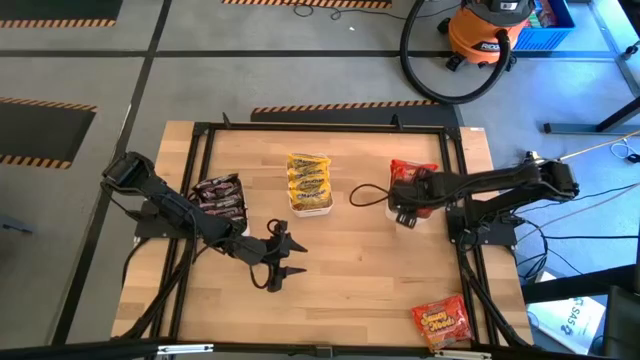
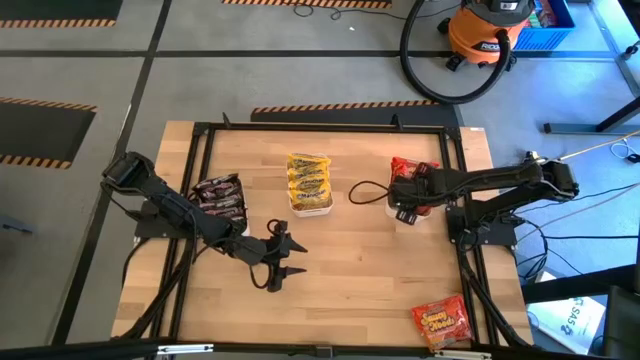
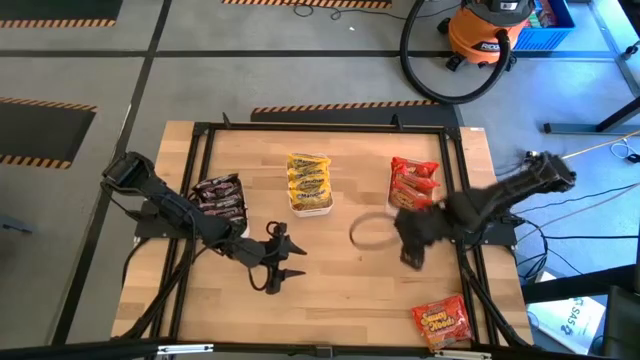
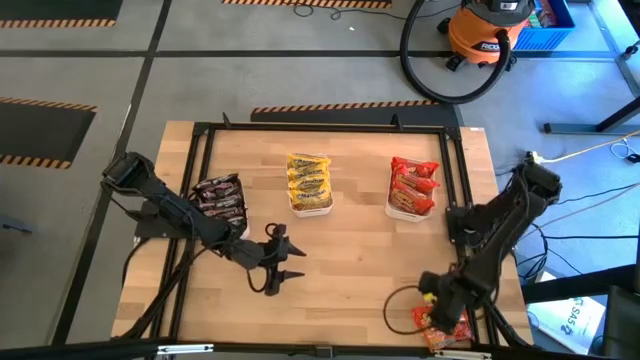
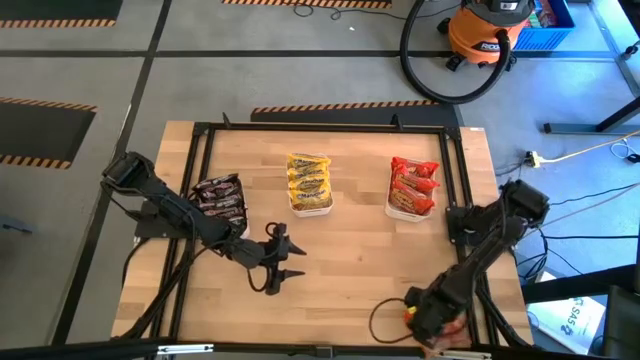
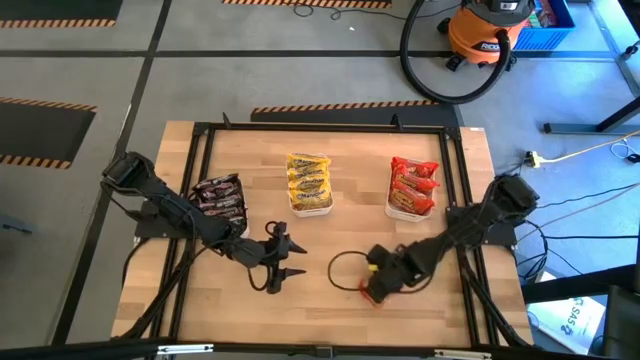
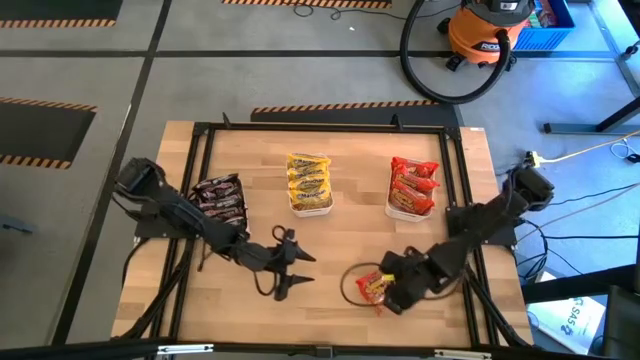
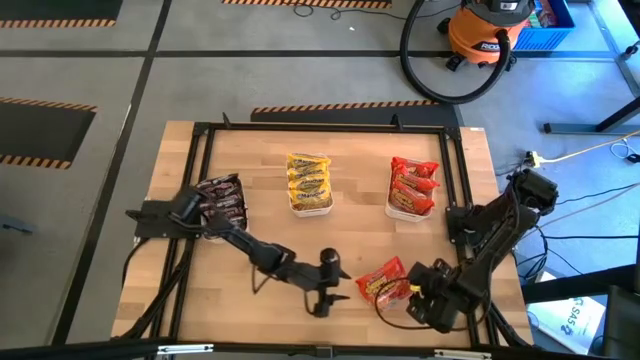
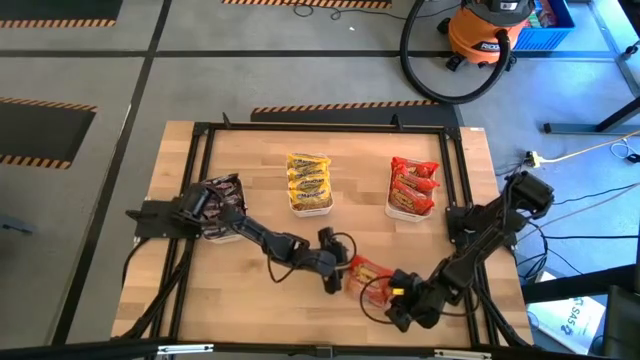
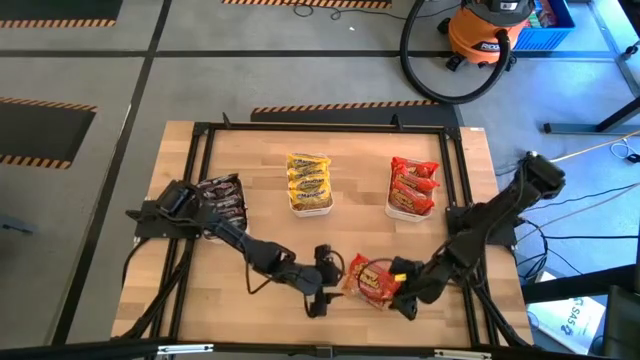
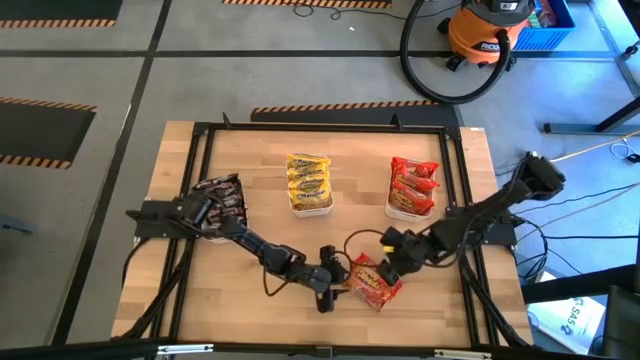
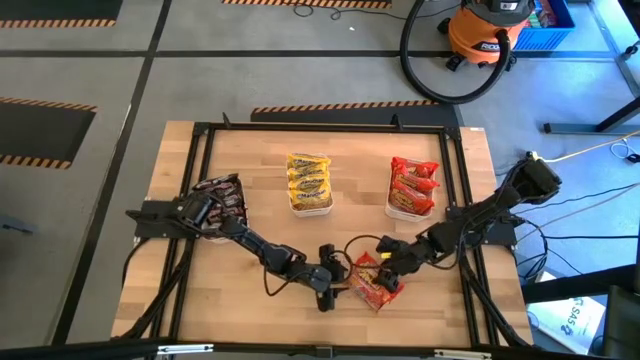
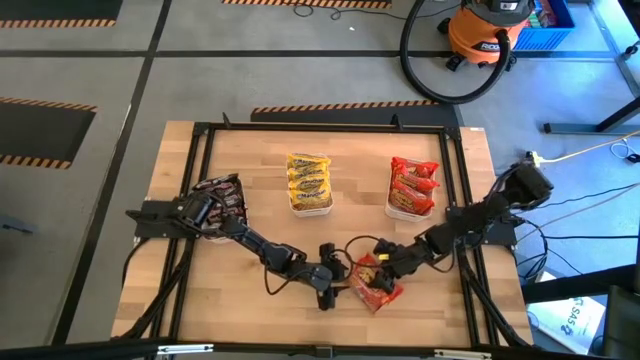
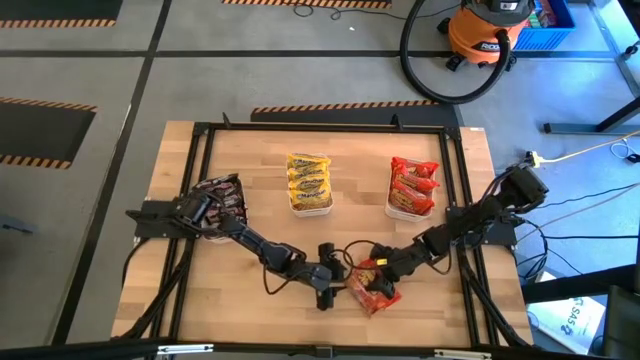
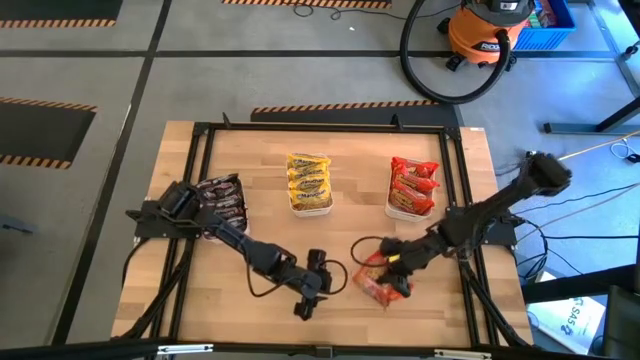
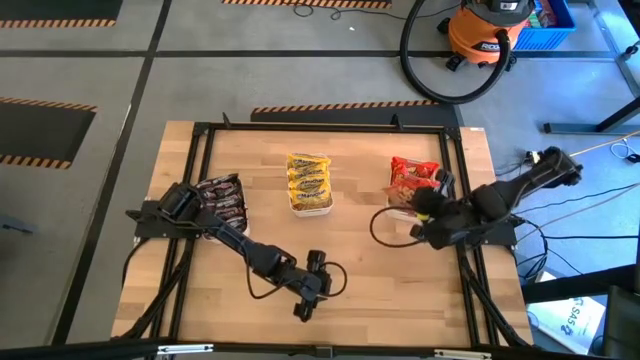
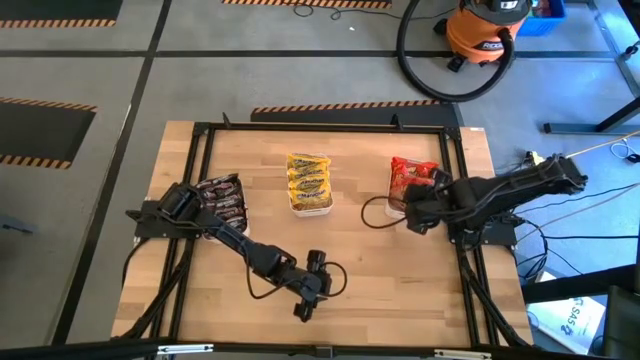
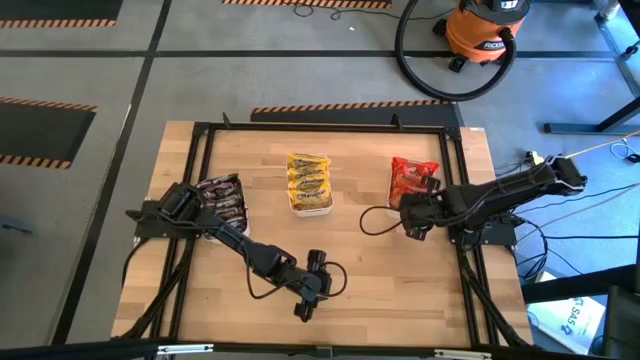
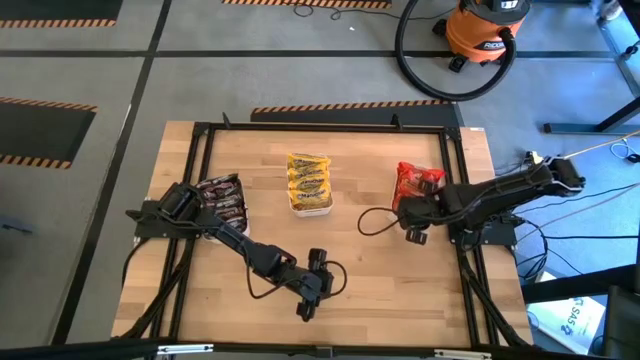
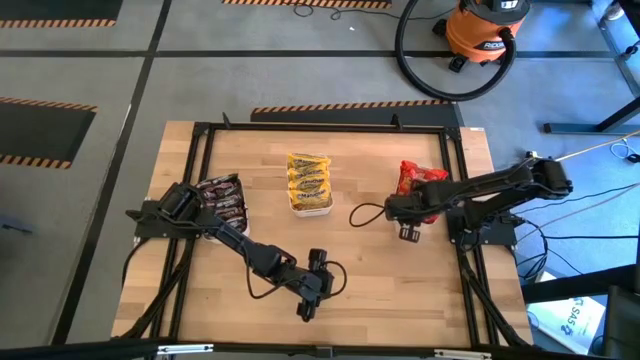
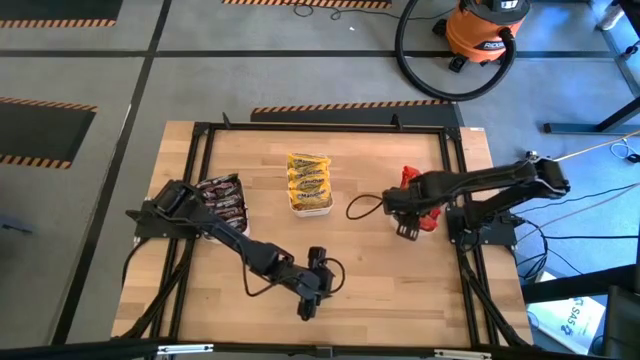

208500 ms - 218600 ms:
Task: Sort Maruchan noodles
Put the orange noodle pack into the right white bin

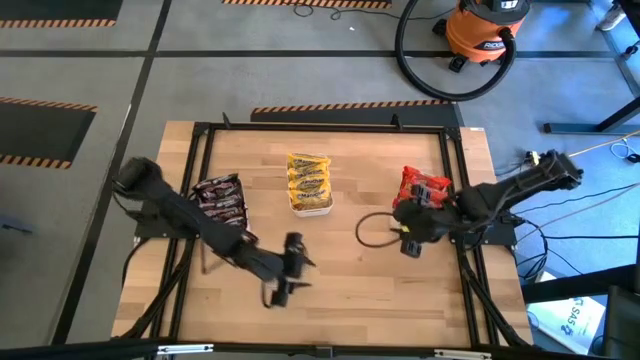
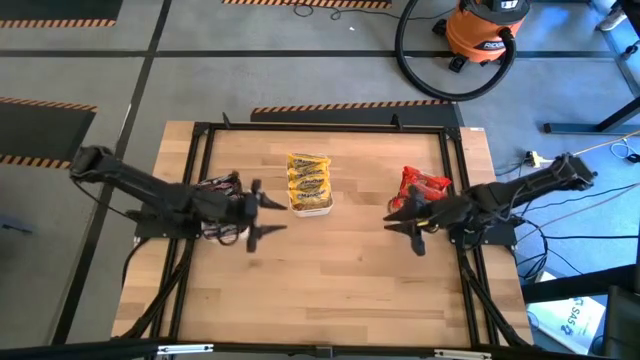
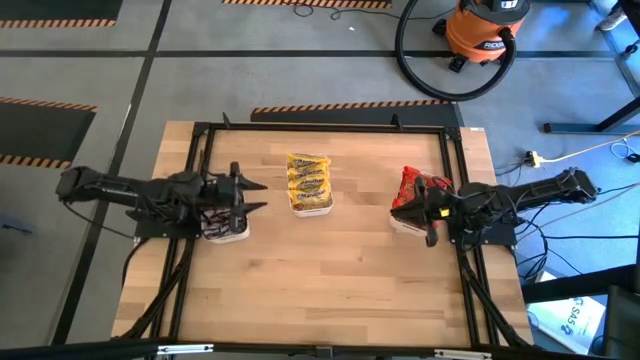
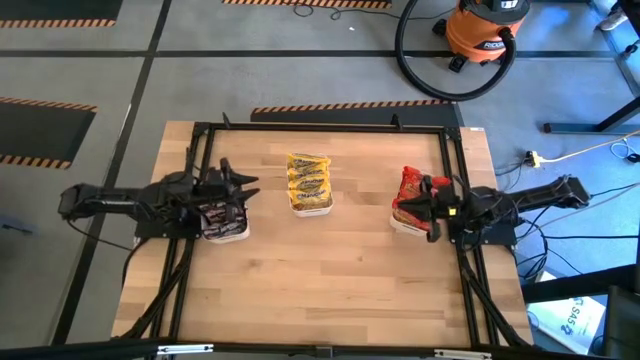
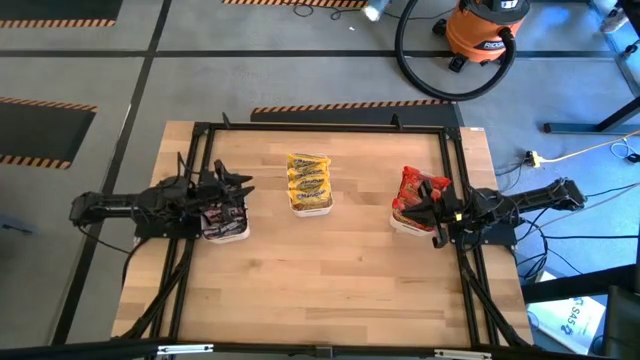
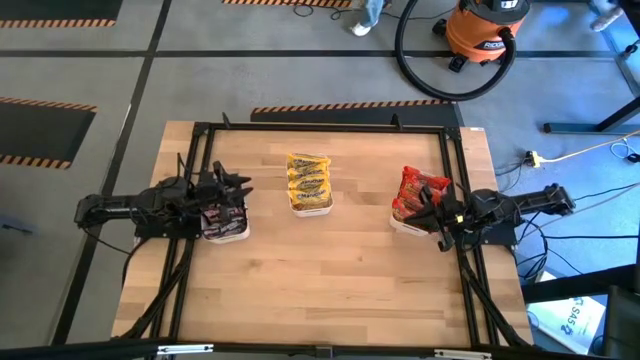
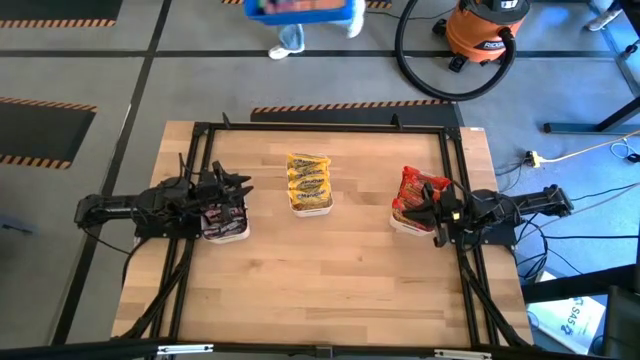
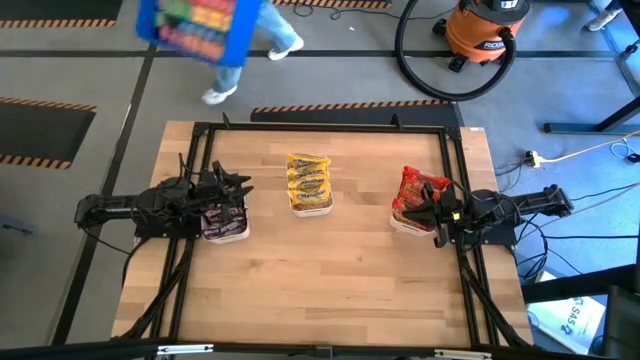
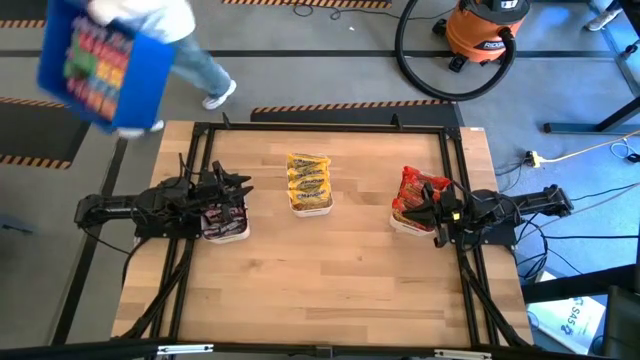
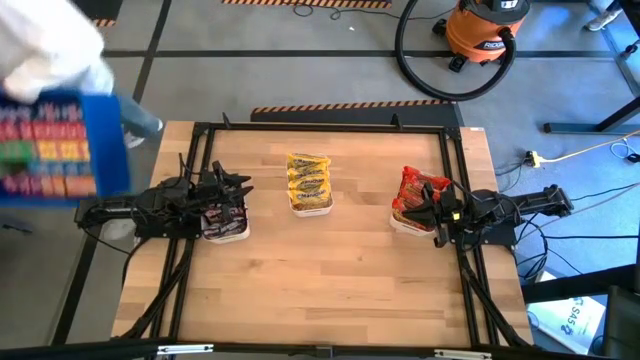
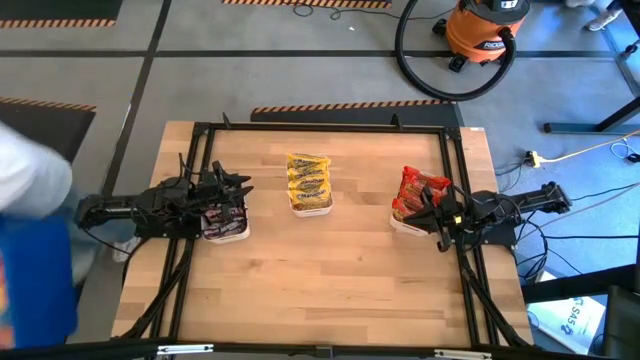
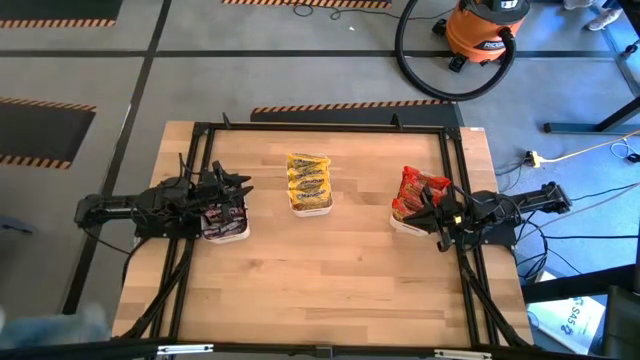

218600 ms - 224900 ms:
Return to Home Position

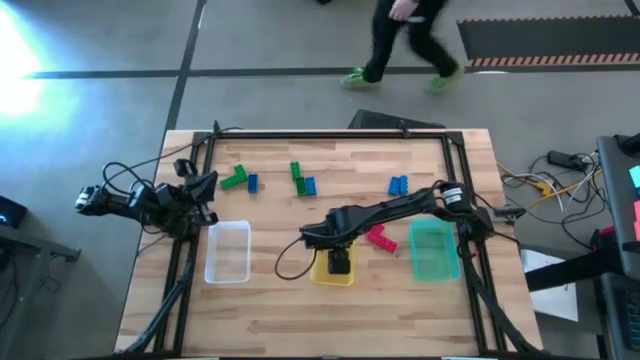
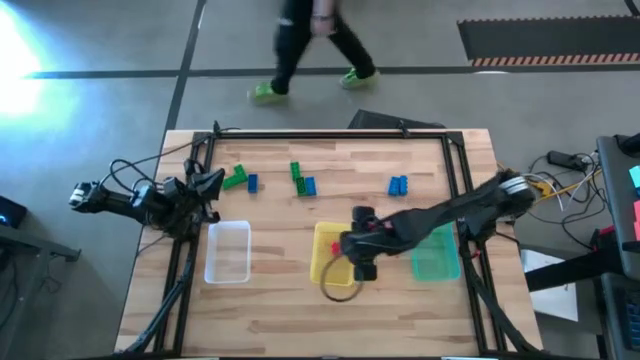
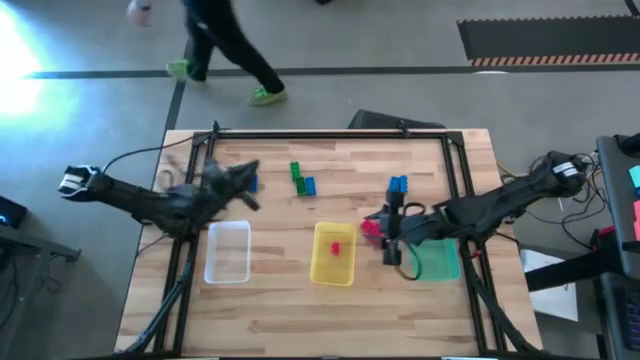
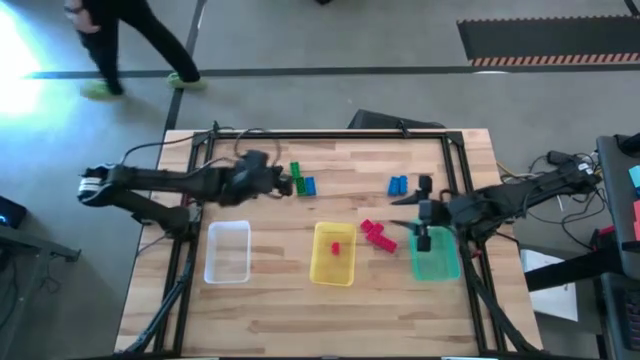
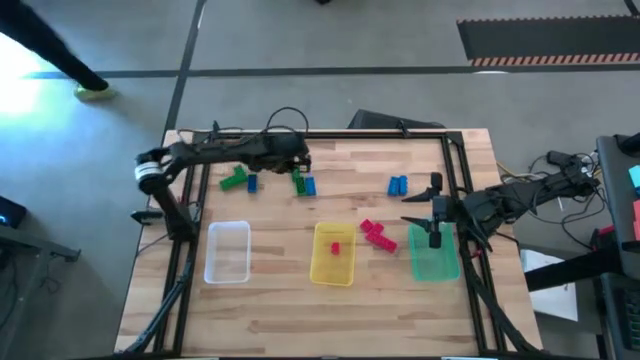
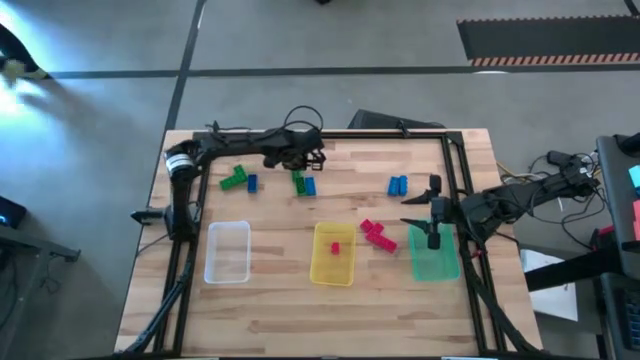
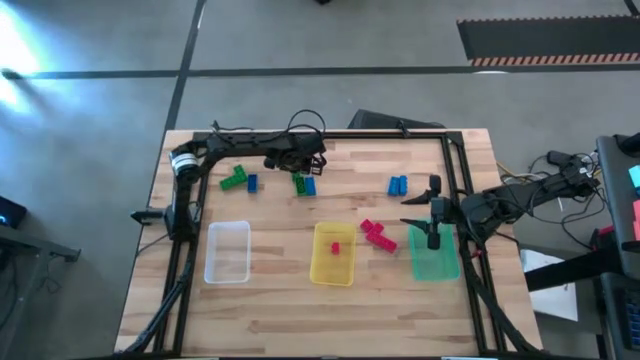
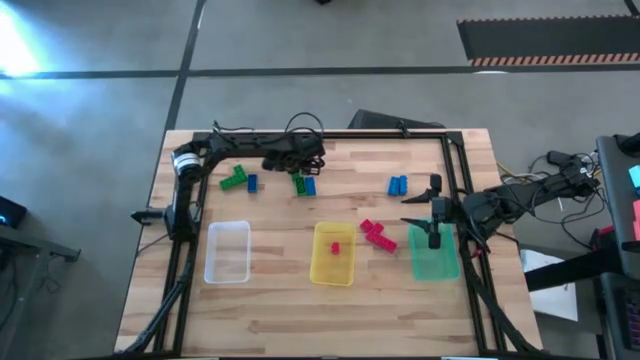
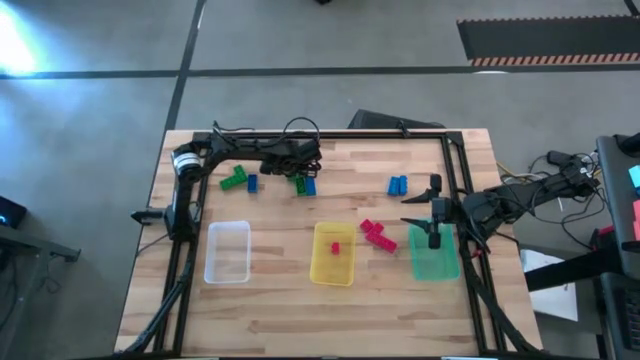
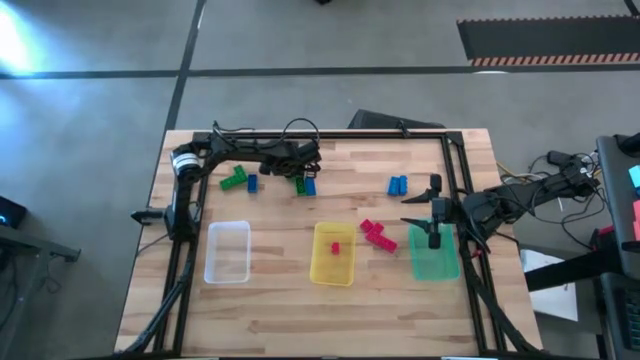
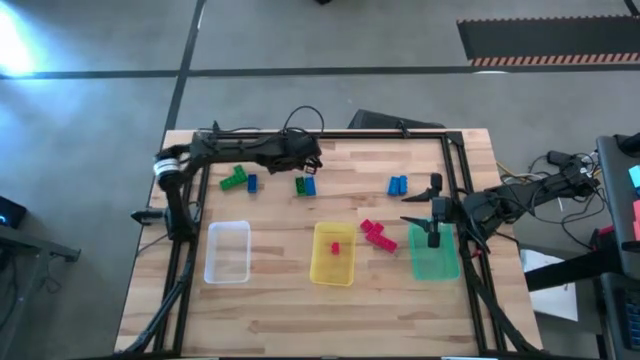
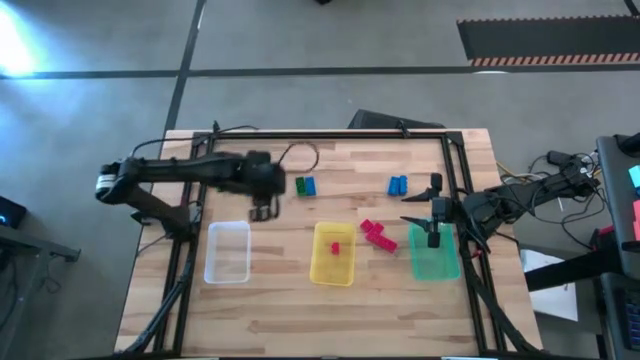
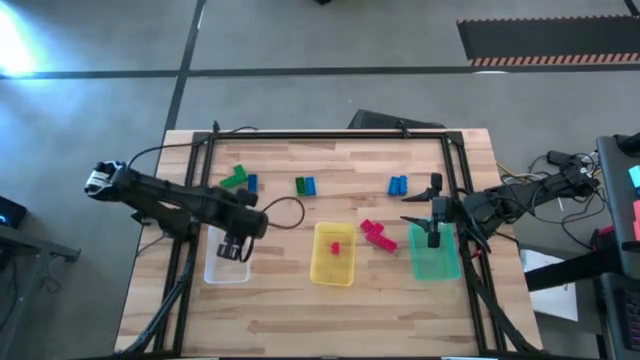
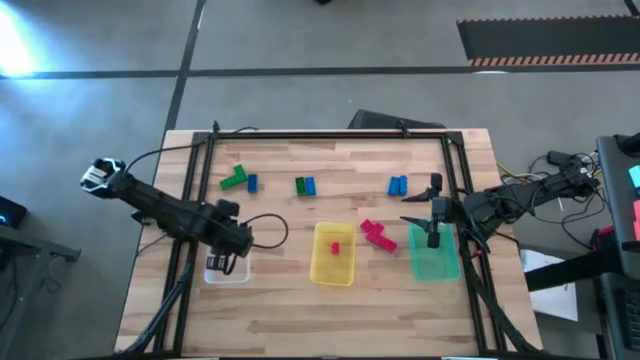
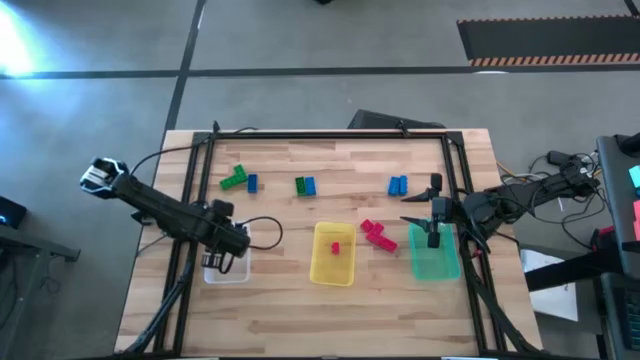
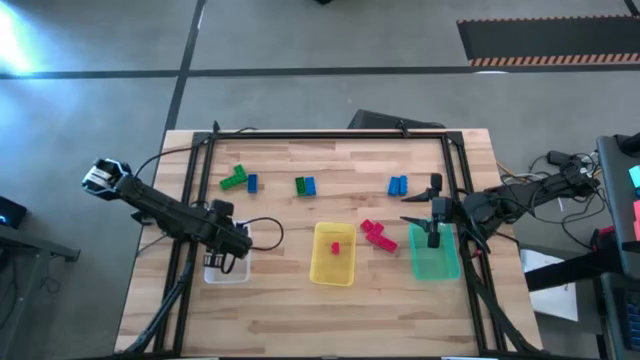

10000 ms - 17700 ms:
Task: Sort & place blocks by color
Put the green game piece into the transparent bin
